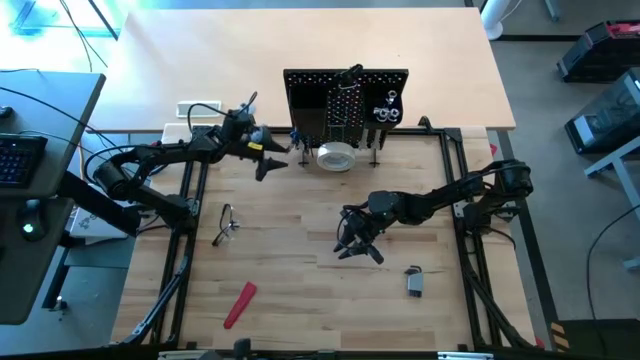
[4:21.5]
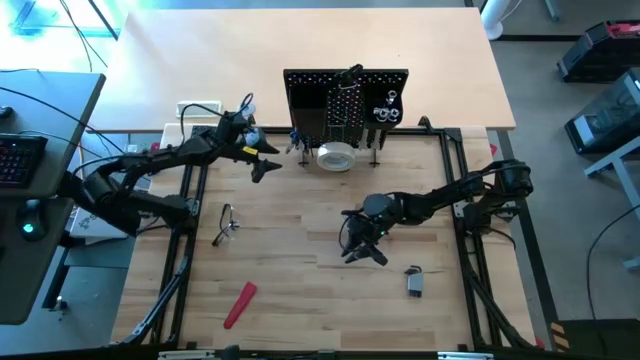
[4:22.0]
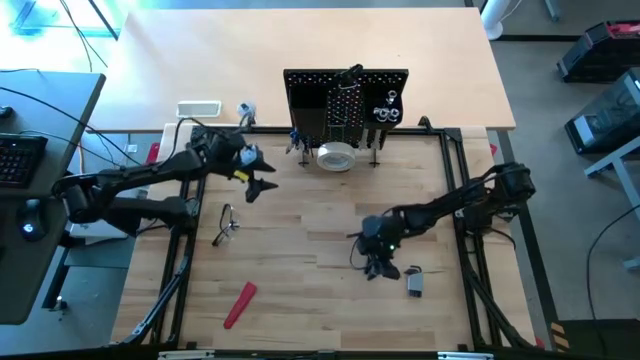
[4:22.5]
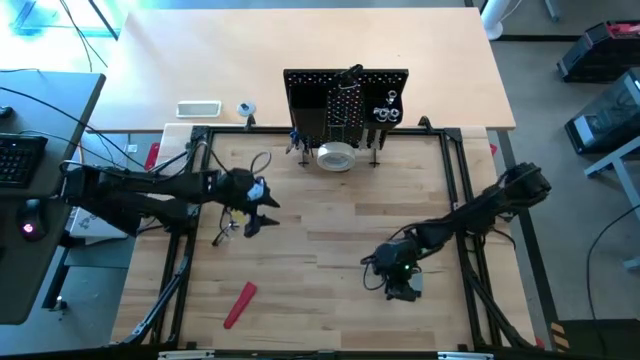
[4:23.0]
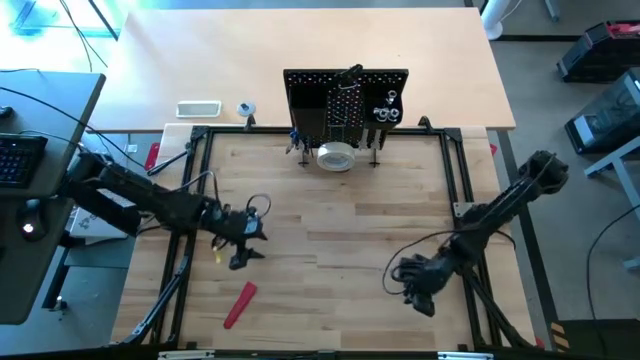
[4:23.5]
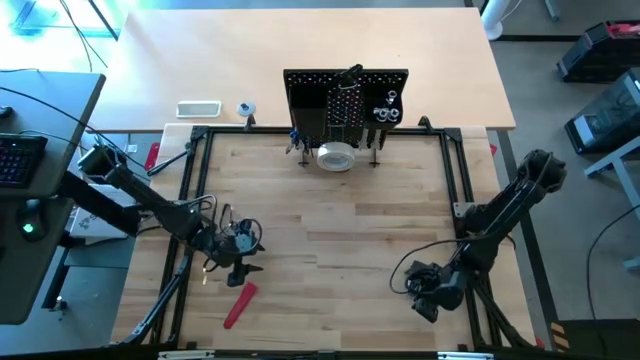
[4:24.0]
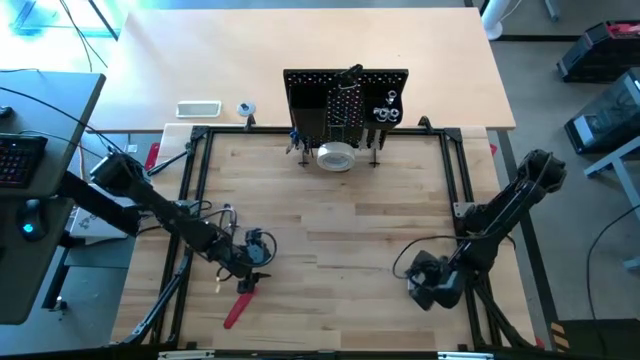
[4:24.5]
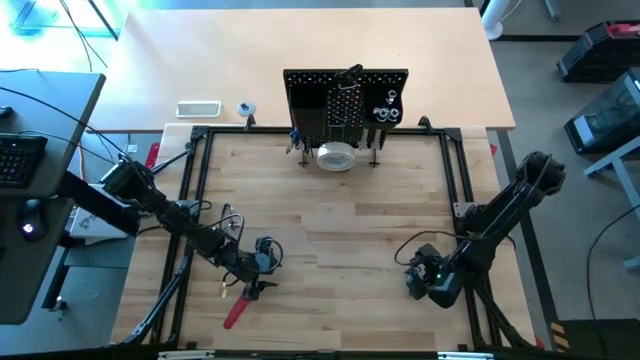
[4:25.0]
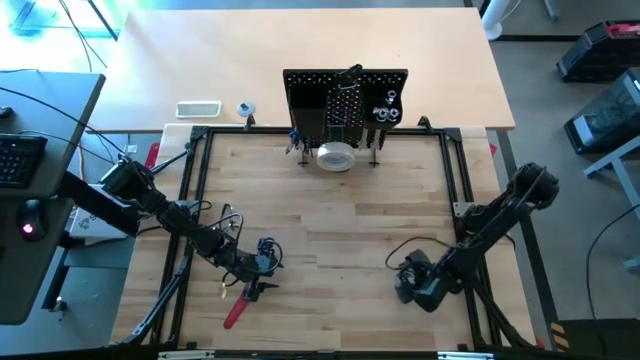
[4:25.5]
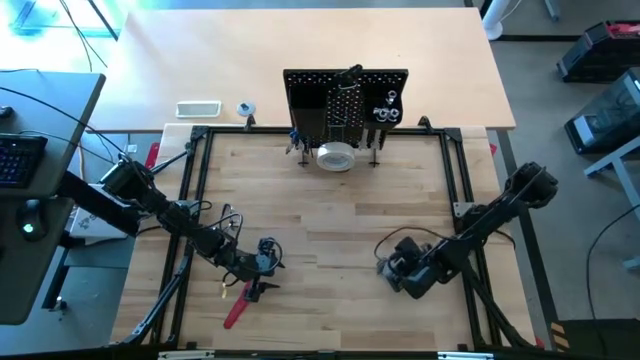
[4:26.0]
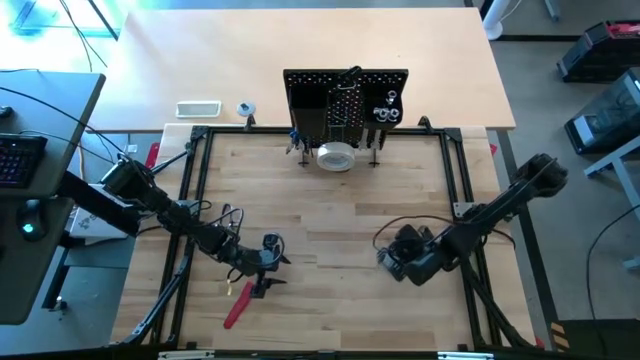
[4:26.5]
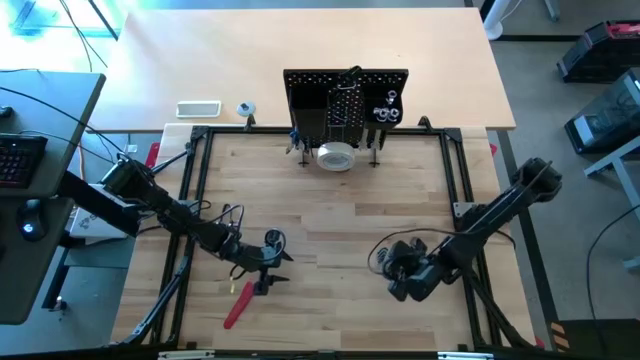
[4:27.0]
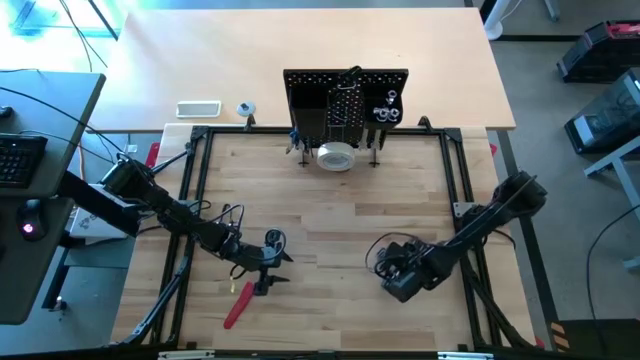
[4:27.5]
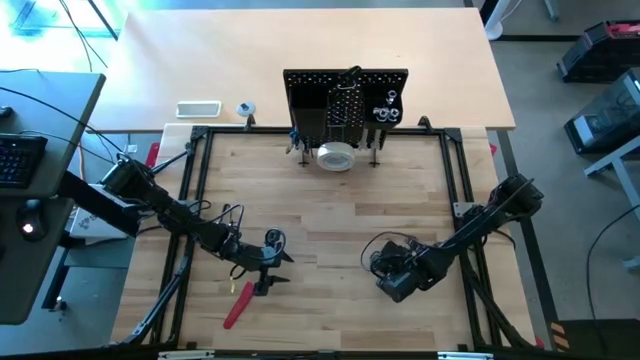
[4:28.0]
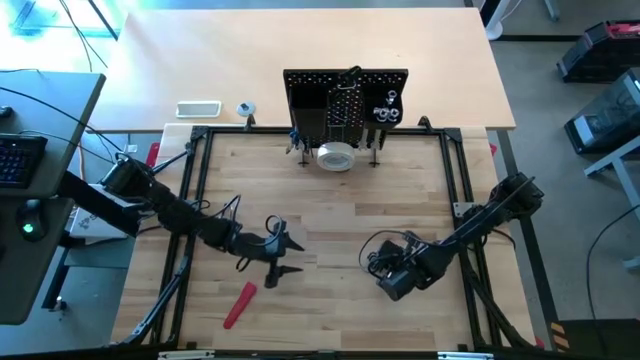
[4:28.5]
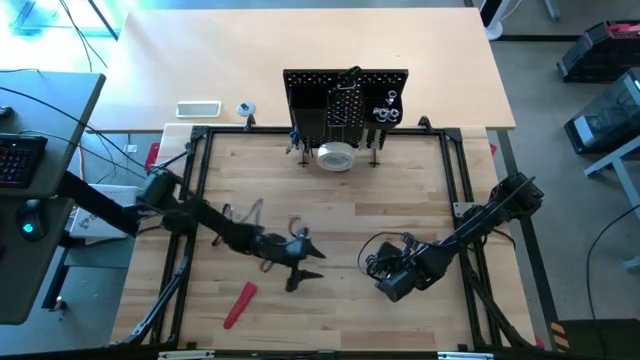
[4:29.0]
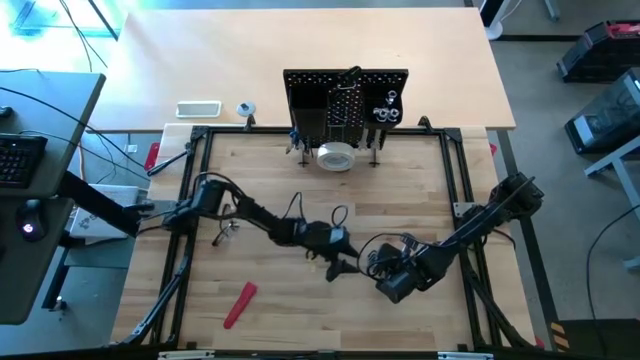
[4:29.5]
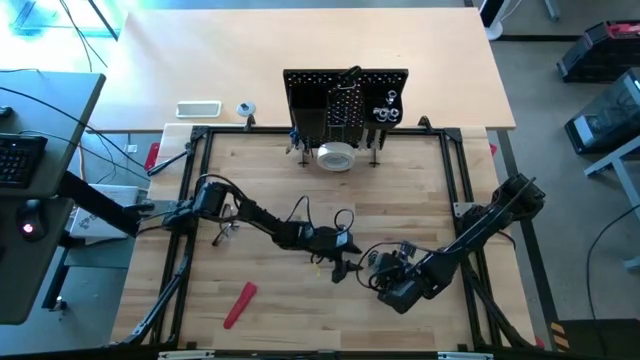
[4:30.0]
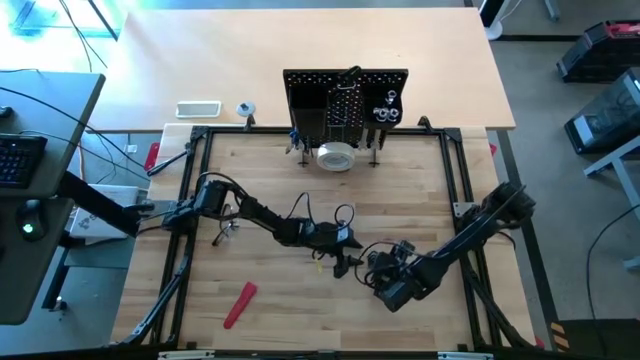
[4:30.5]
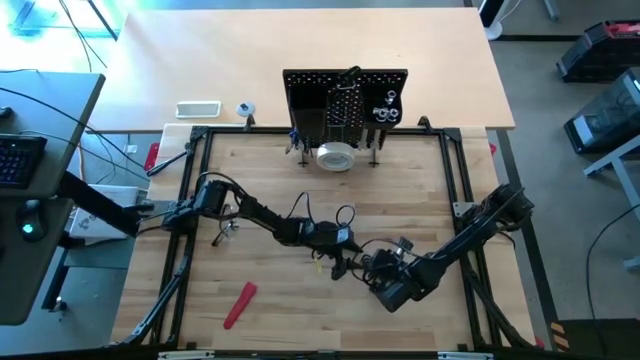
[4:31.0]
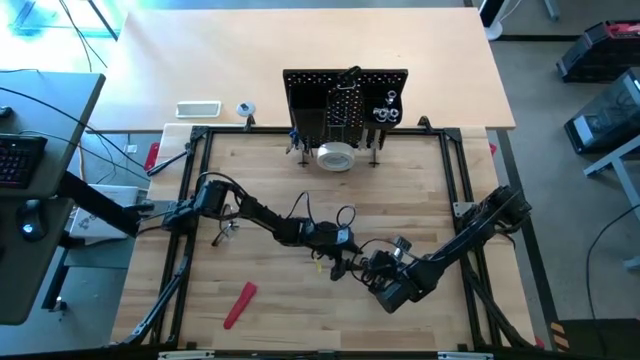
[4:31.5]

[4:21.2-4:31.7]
Task: Hang tools onto peg board
Put the gray allen hex keys into the left black bin on the peg board

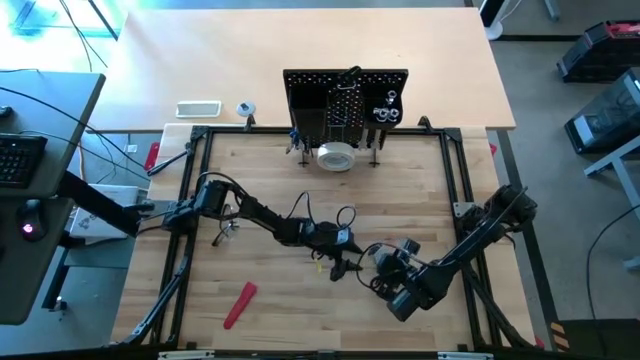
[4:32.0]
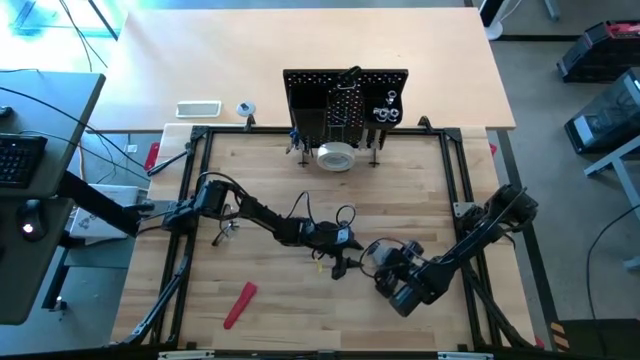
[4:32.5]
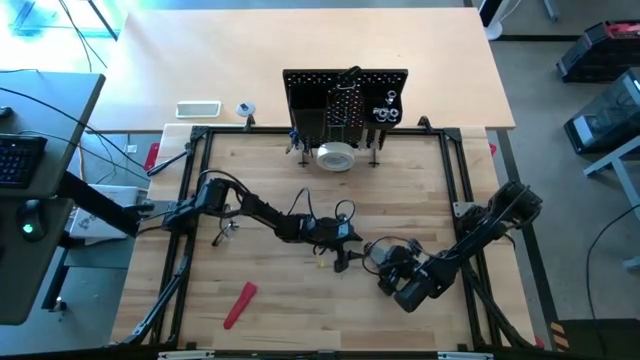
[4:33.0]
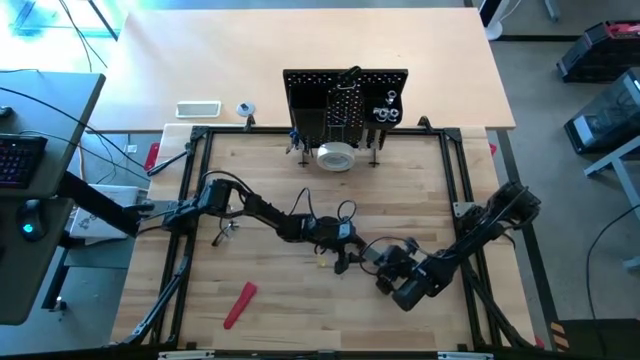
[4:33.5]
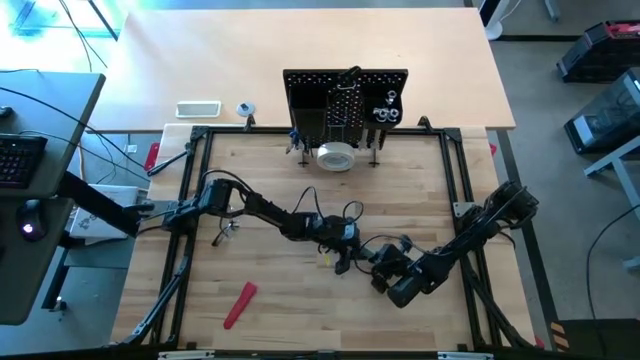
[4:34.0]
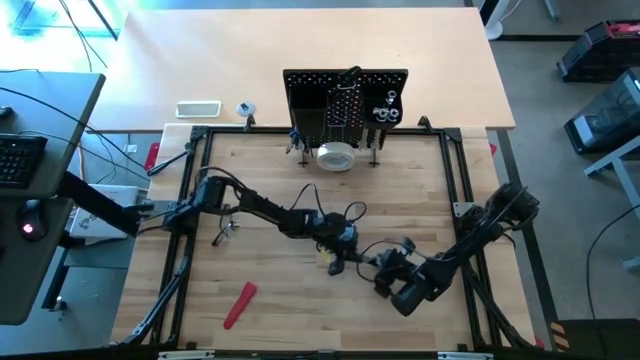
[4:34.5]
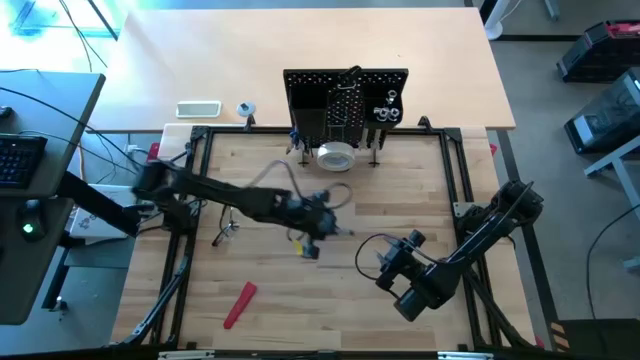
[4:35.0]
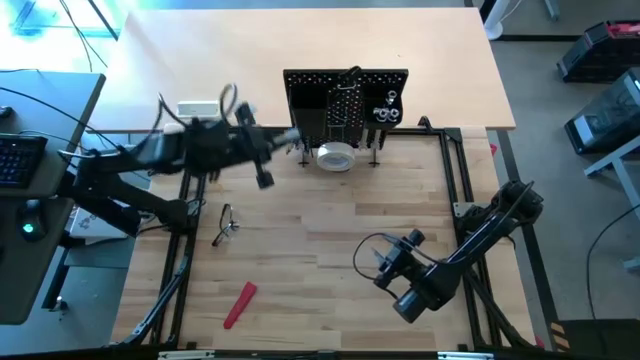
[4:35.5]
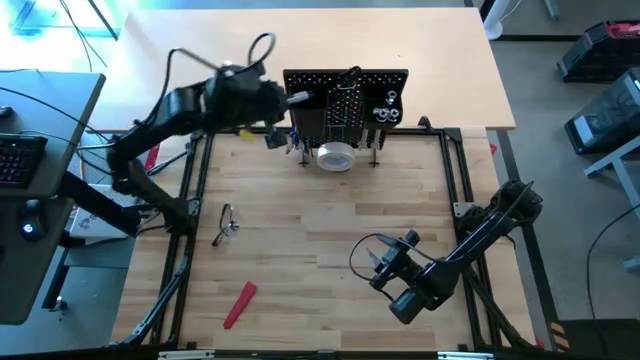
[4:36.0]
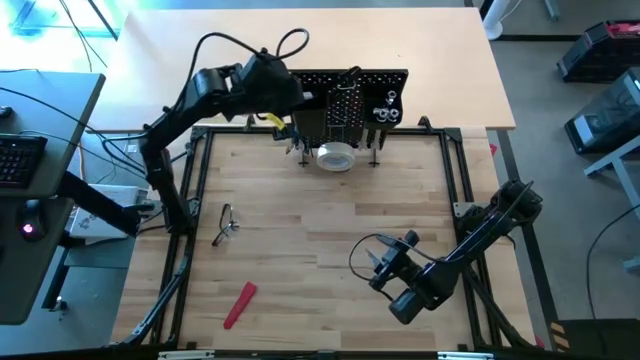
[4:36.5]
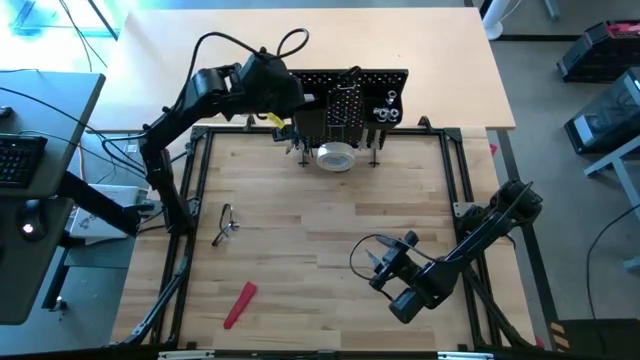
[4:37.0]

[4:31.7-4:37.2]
Put the gray allen hex keys into the left black bin on the peg board

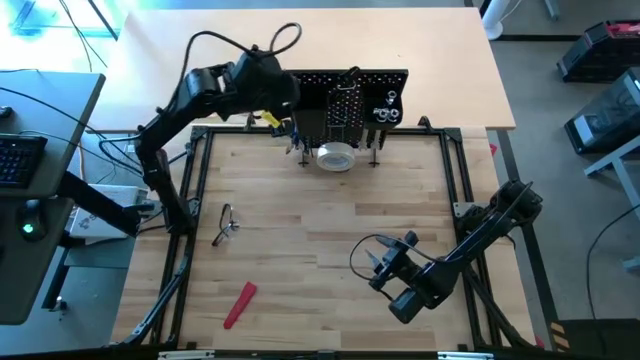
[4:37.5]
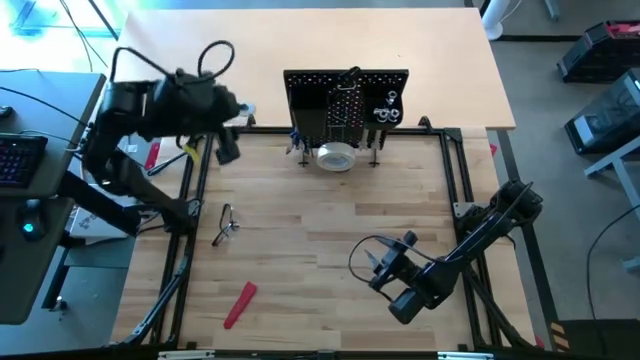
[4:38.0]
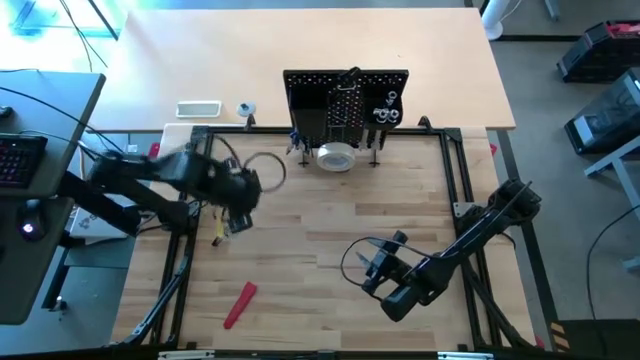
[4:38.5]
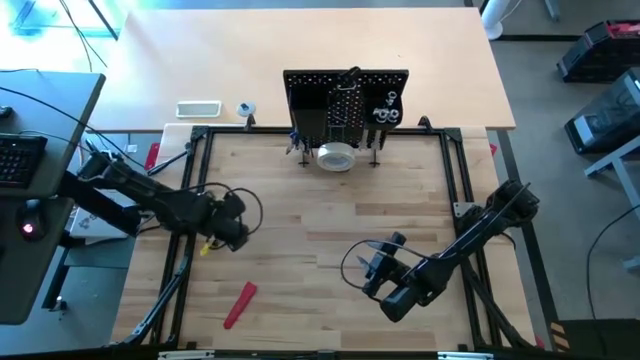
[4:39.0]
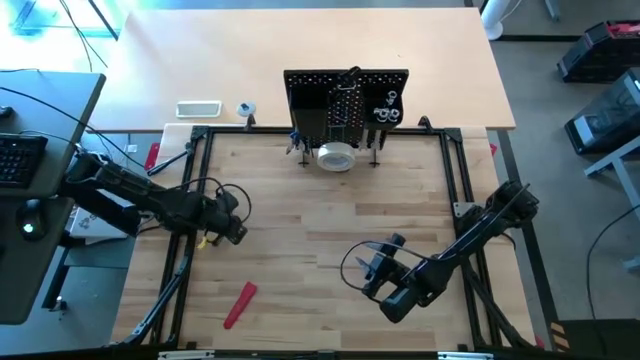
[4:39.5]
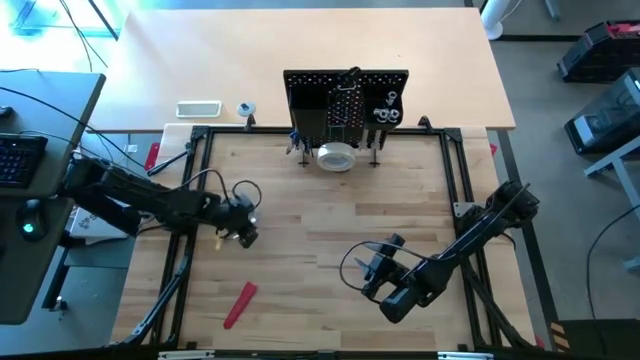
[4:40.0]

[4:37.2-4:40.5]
Move the transparent safety glass to the center of the table

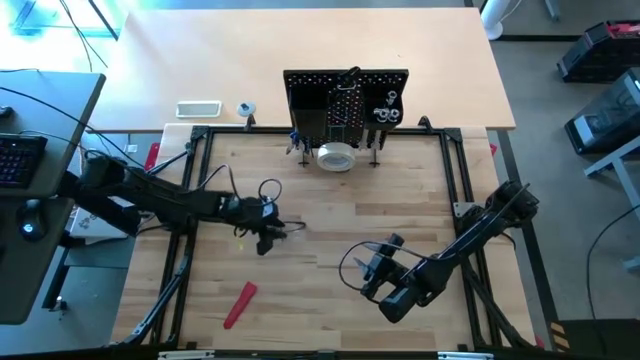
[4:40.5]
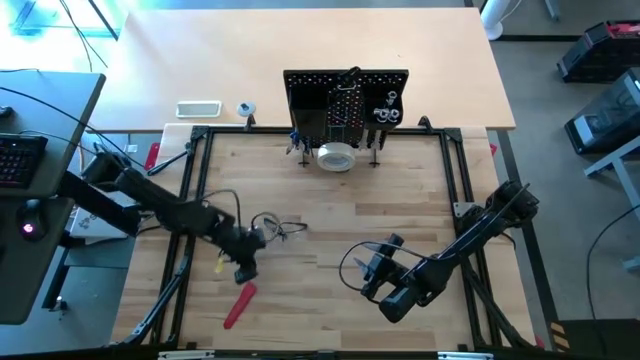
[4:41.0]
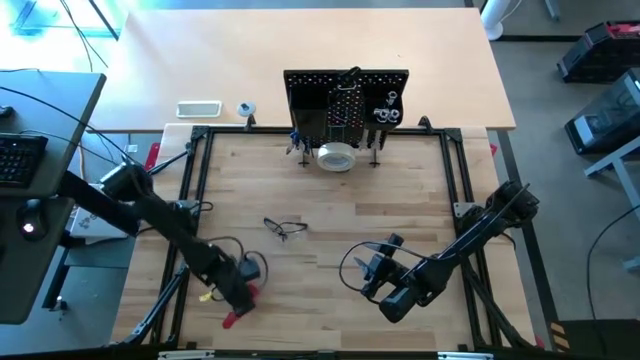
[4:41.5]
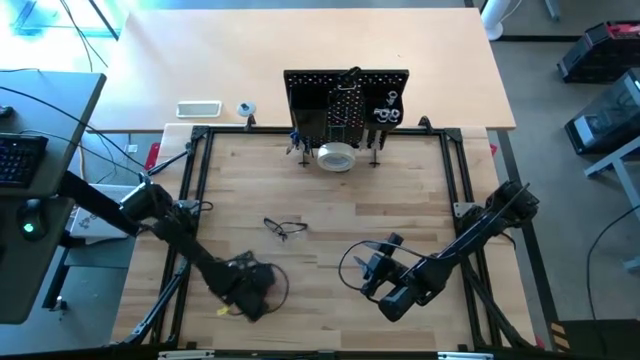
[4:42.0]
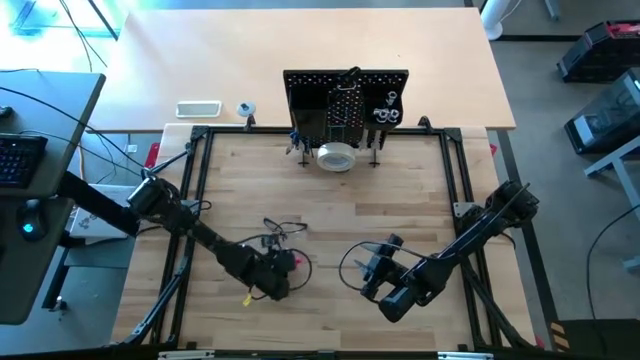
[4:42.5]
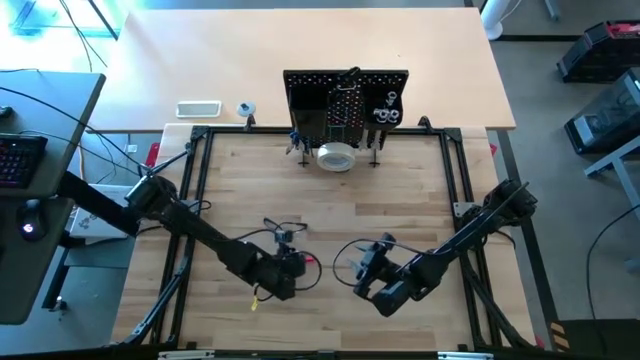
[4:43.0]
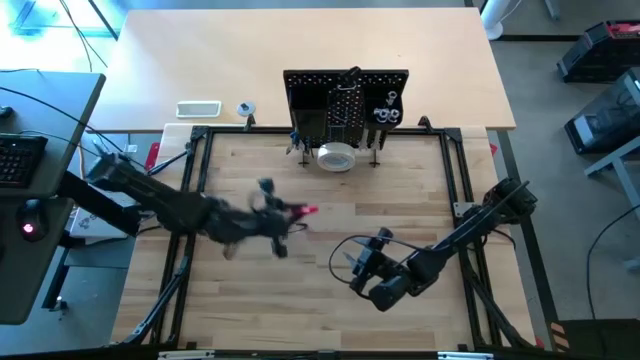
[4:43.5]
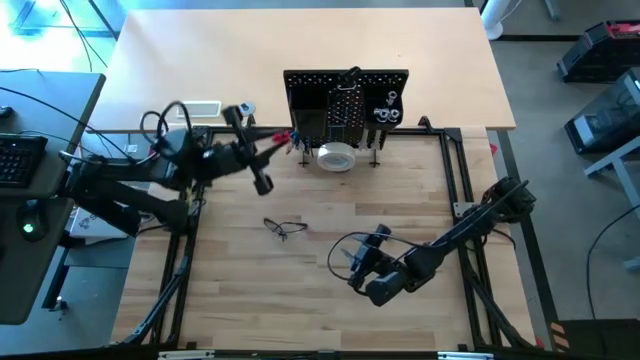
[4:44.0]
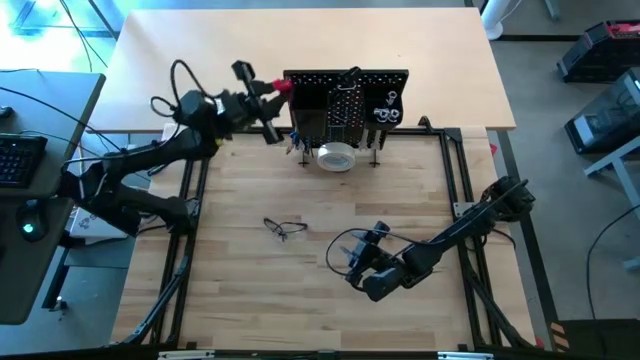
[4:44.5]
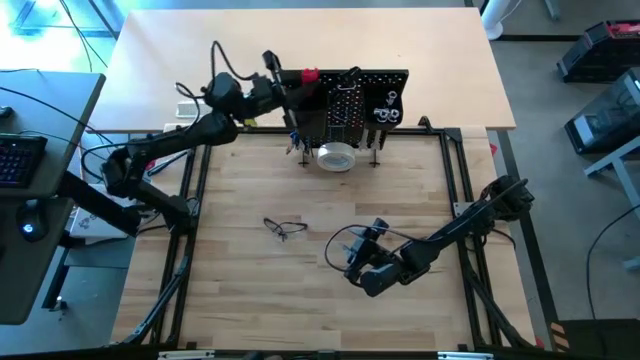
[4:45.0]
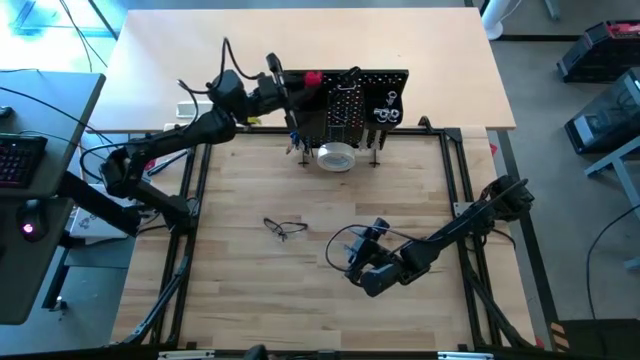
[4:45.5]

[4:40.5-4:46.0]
Put the red cutter knife into the left black bin on the peg board
